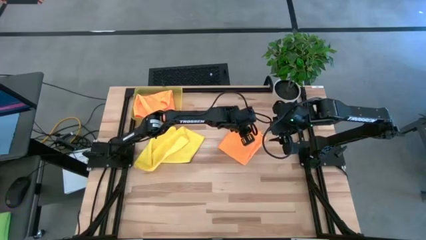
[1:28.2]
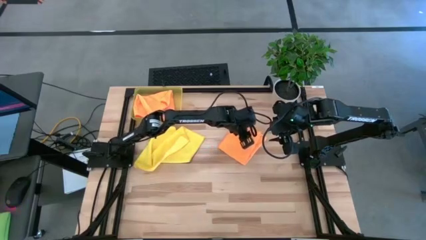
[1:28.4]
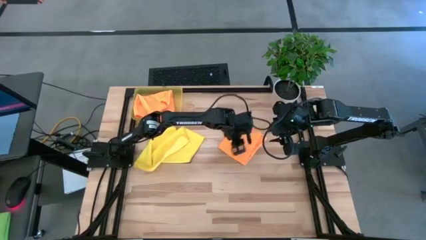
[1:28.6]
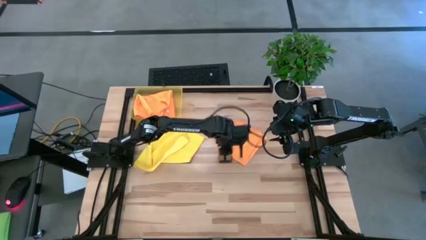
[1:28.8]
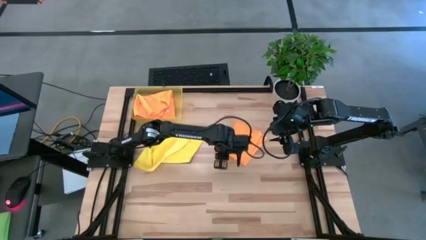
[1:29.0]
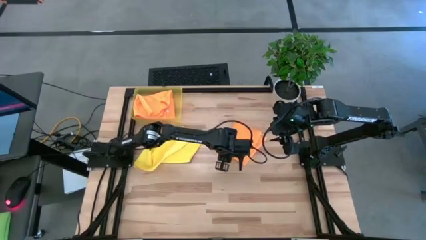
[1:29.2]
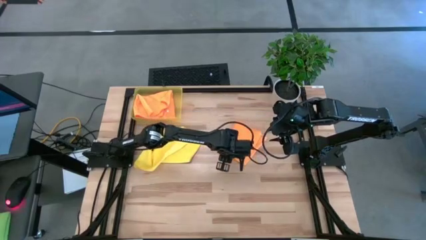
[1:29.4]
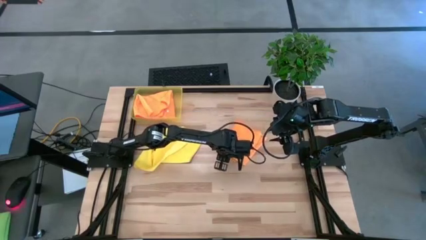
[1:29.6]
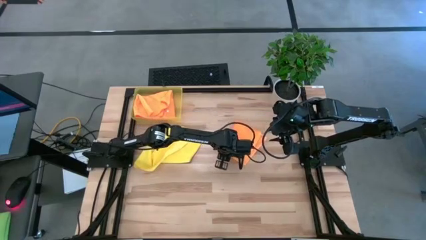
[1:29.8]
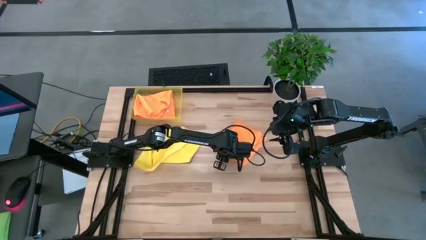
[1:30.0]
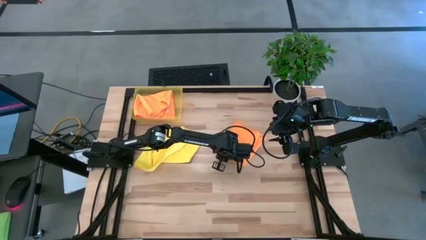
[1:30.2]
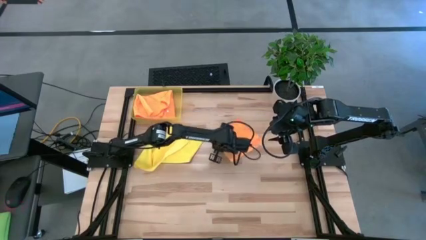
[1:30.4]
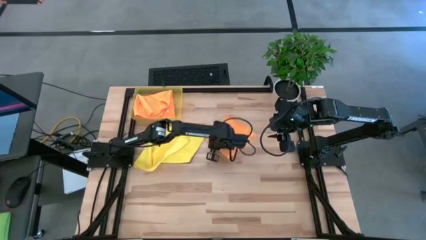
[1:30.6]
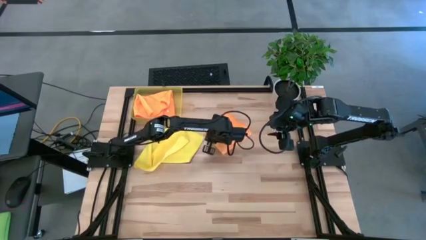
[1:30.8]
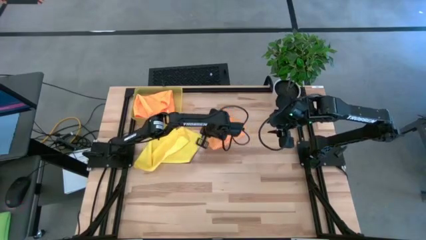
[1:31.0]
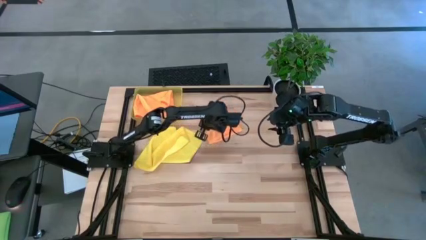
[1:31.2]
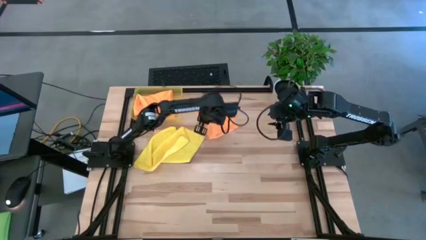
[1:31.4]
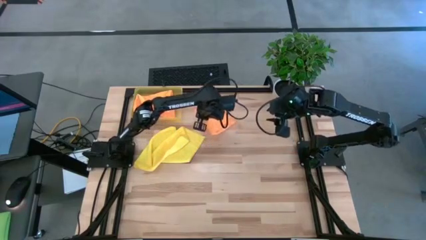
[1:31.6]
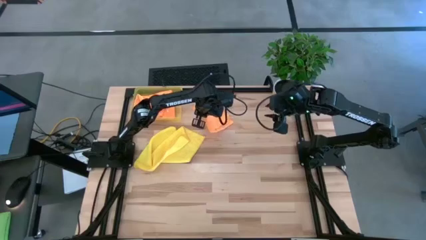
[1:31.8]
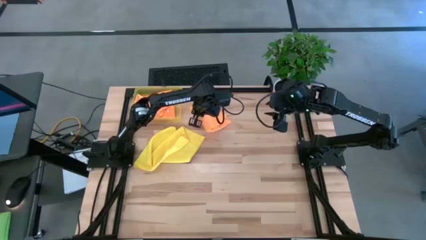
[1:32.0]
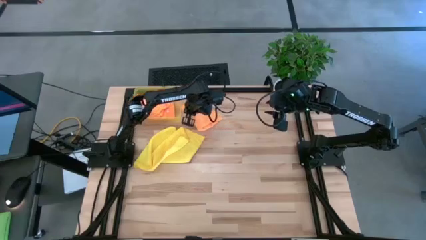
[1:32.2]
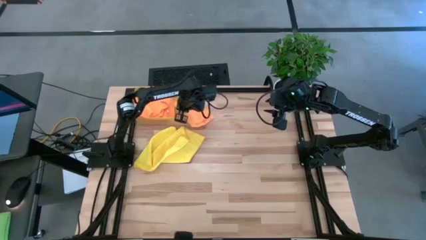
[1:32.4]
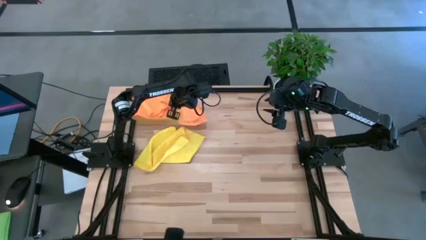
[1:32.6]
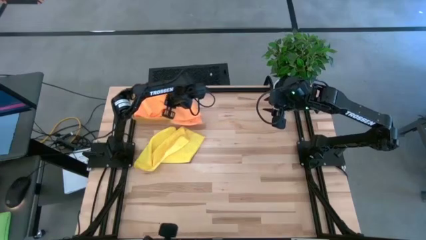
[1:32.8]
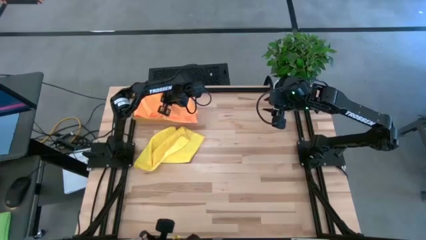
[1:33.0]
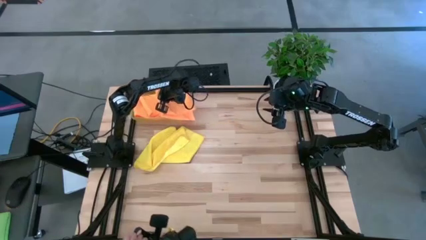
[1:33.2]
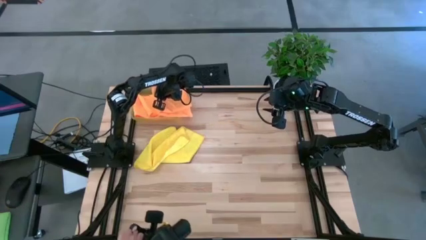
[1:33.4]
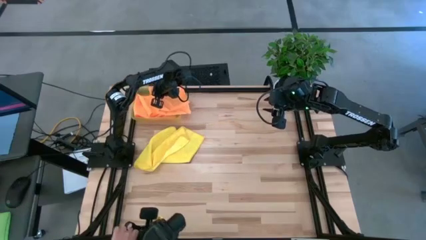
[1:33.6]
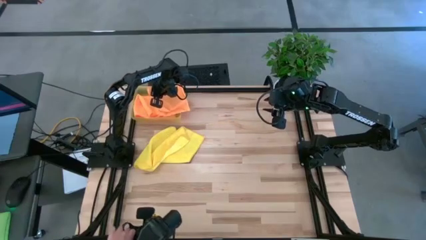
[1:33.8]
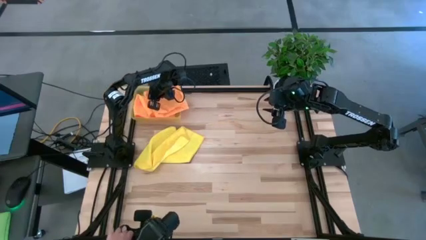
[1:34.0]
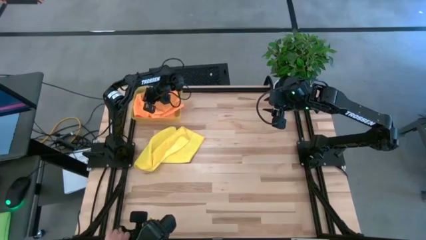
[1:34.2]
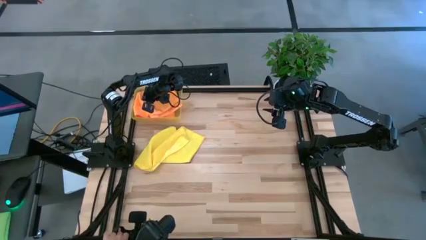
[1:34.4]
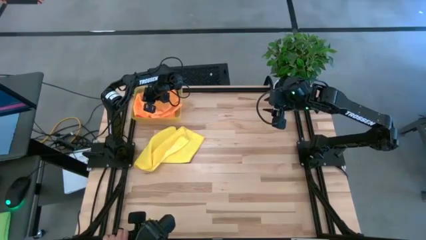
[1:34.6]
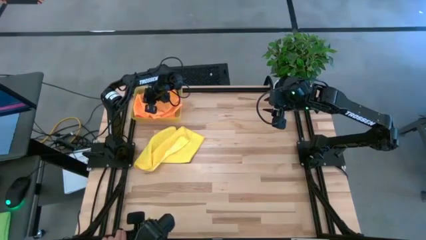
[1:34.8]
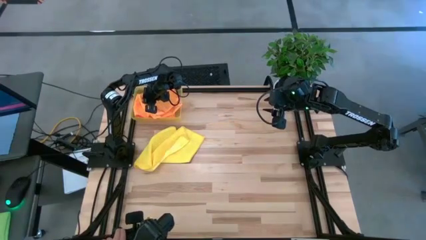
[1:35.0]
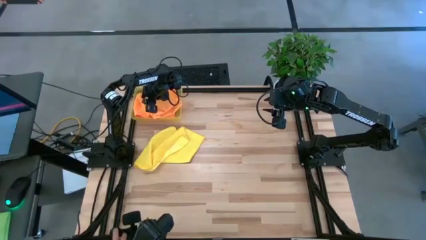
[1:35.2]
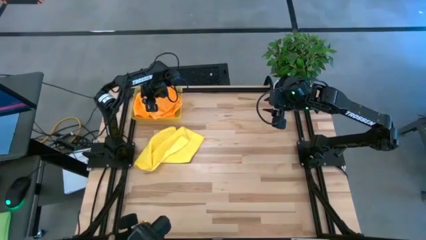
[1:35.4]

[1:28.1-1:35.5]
Task: Fold microfiber towels
Put the folded orange microfiber cloth into the yellow bin

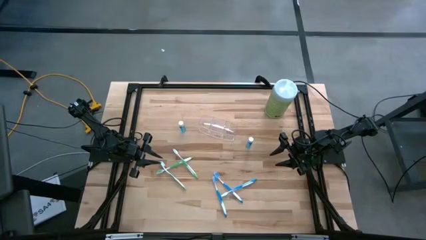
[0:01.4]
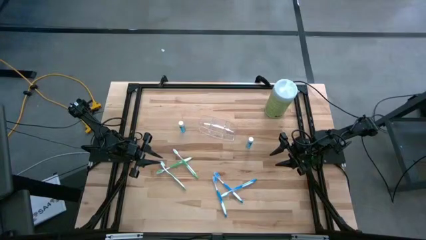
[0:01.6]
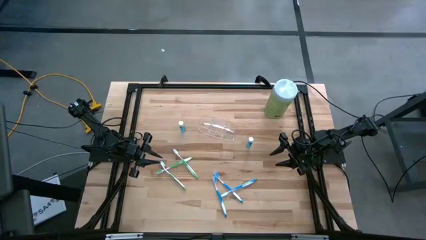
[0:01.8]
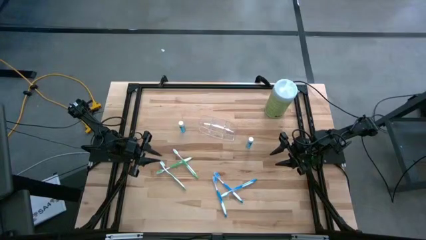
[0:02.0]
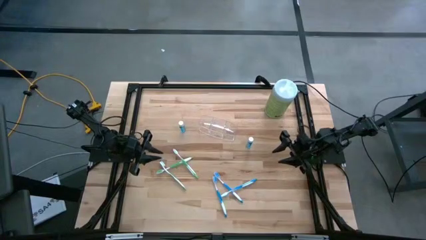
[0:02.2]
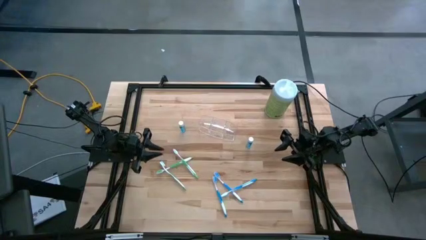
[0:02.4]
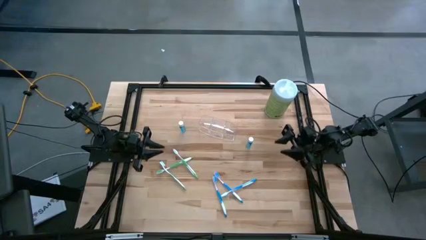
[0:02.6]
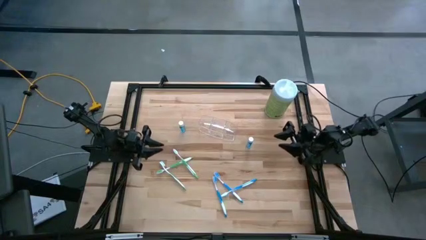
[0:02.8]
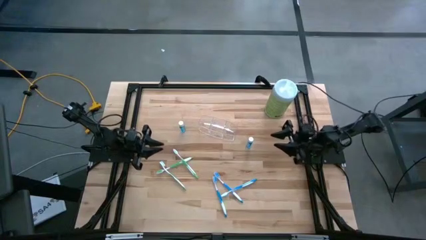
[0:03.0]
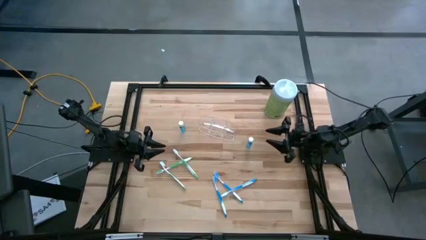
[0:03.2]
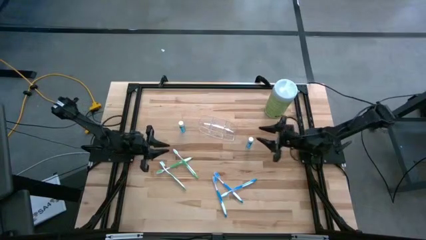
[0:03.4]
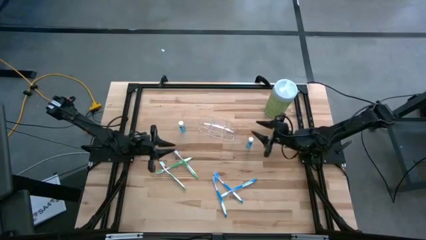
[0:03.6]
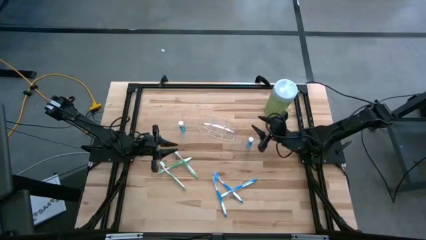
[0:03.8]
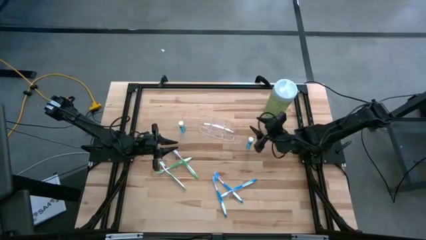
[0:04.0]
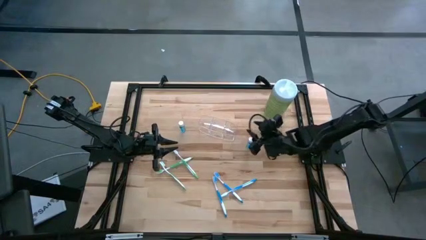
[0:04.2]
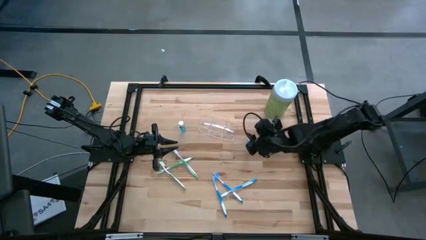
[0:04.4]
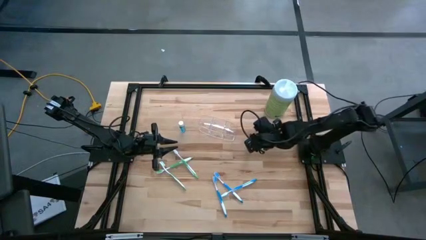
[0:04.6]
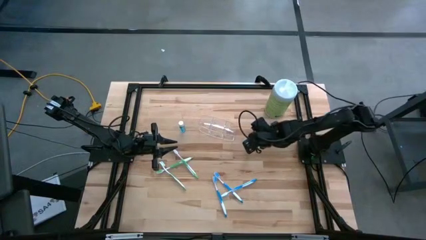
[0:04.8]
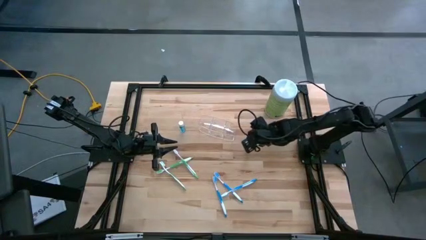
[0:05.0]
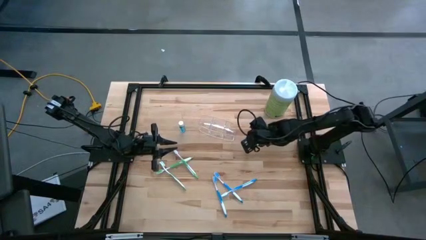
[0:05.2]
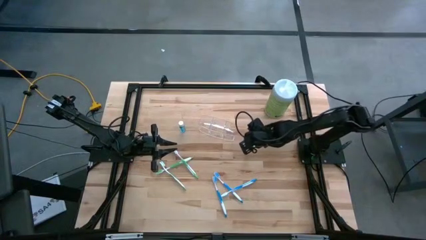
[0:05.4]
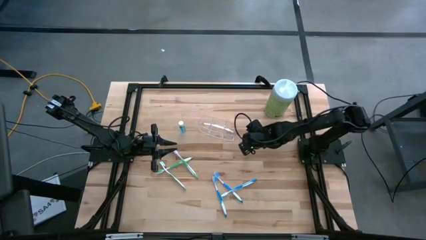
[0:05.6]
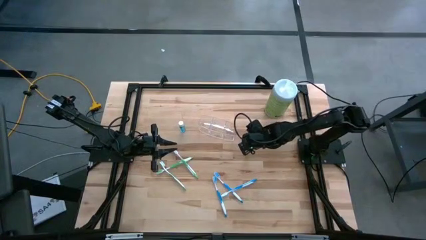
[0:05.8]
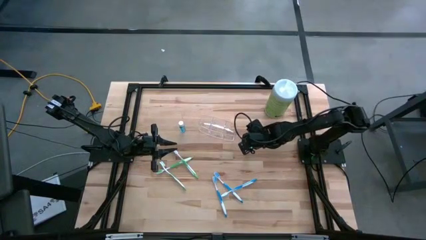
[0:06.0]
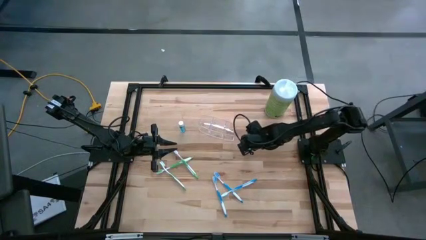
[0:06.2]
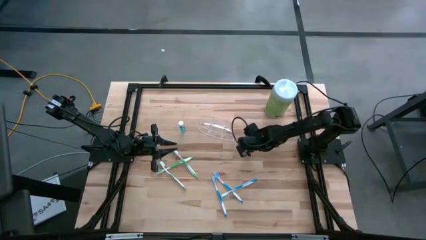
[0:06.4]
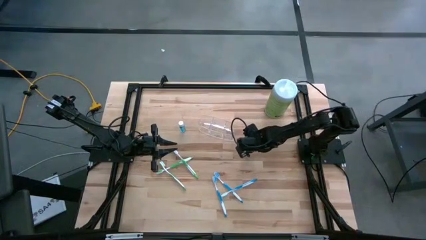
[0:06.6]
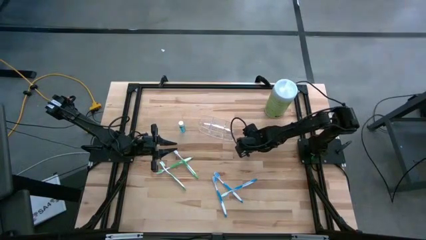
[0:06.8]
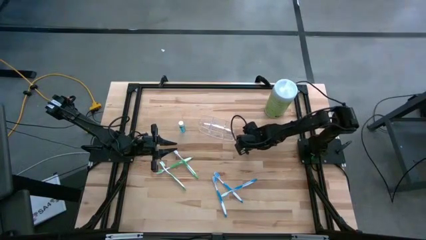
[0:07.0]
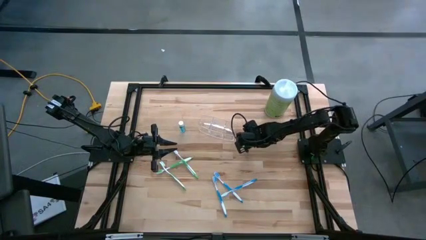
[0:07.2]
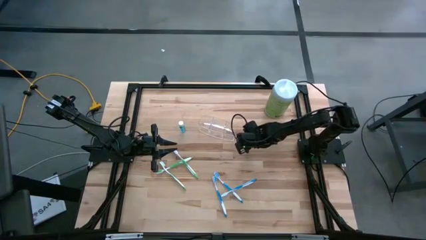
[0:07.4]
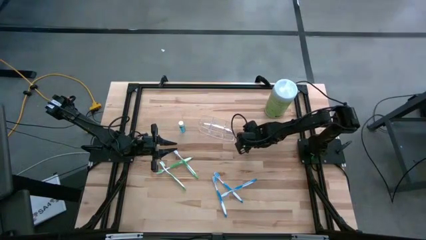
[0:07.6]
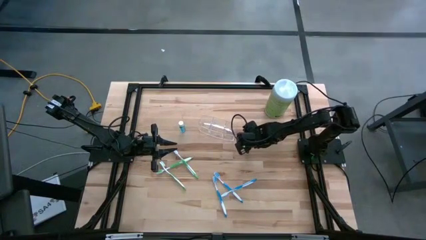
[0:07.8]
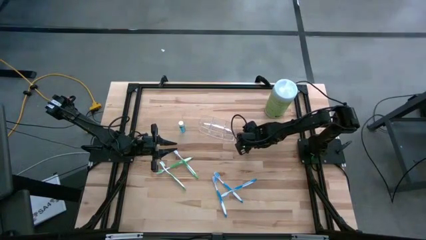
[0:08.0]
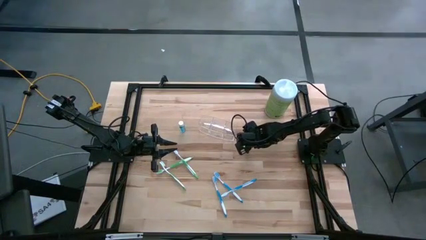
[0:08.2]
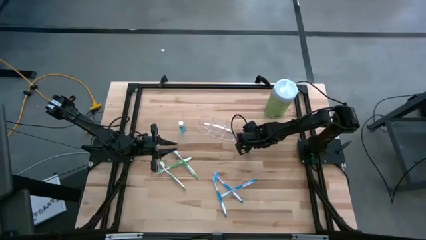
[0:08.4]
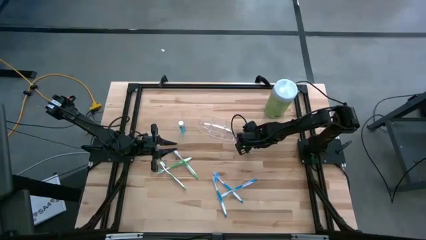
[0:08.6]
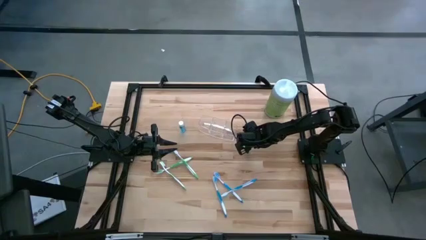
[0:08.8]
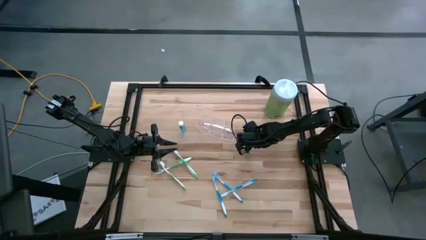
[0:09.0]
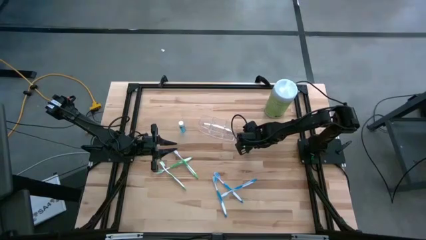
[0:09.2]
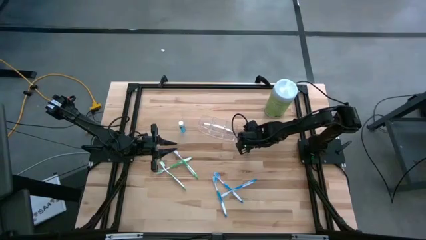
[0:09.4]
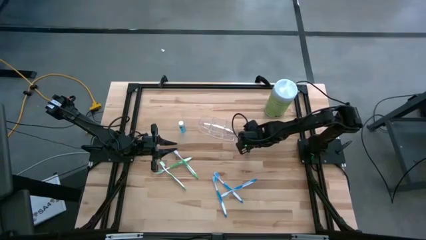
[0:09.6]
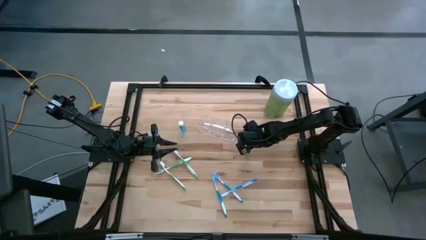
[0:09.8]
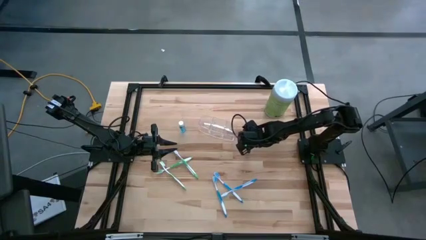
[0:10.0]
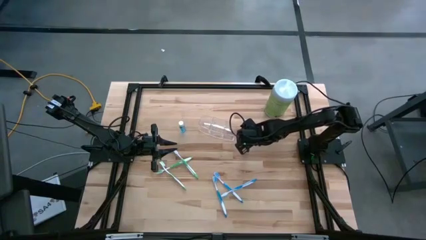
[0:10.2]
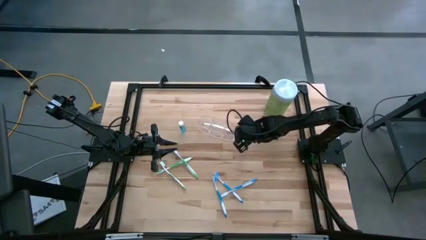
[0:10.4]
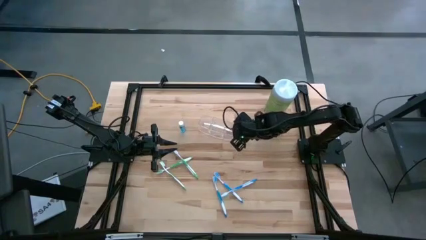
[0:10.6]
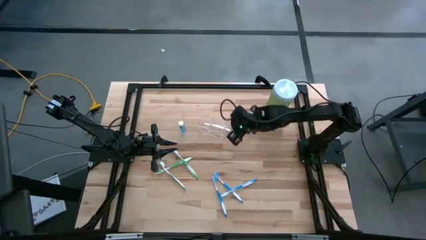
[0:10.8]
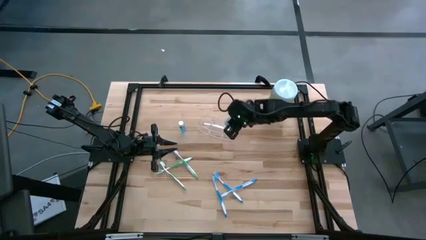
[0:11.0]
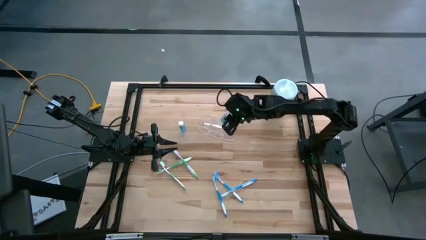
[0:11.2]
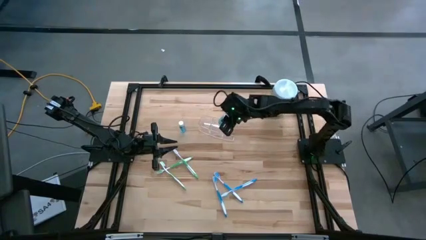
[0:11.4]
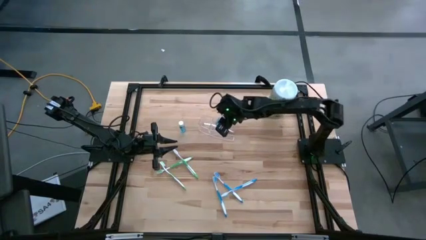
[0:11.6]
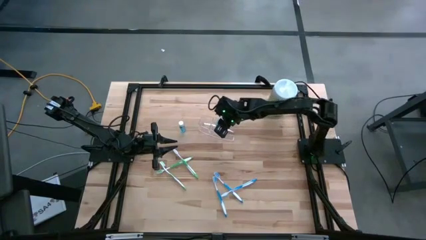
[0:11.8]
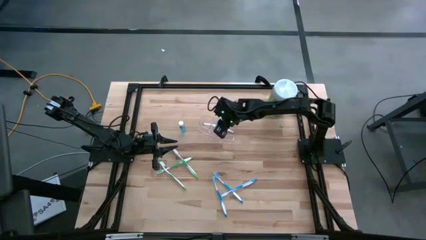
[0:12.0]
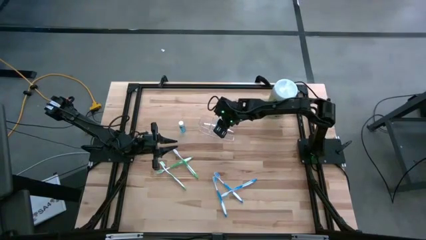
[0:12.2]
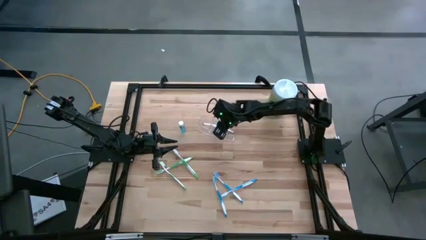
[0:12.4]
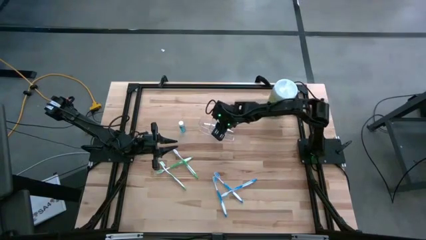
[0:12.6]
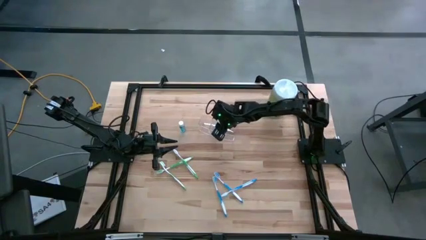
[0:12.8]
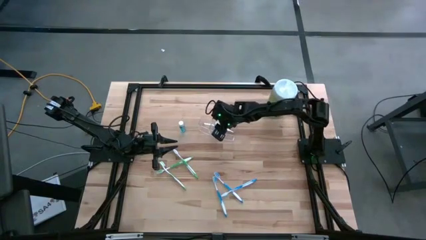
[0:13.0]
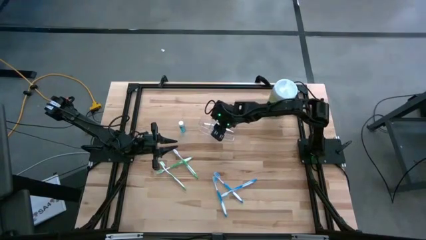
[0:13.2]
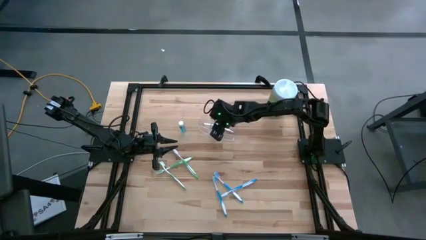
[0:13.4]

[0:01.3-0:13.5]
Task: Pick & Place toothbrushing station
Put the right blue mouthwash into the transparent organizer
